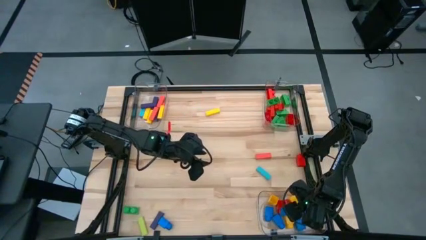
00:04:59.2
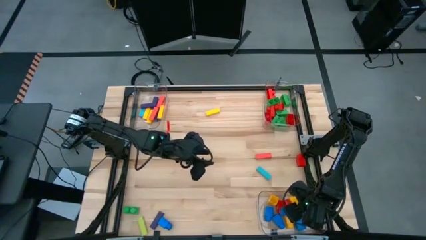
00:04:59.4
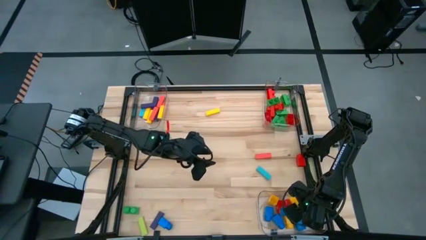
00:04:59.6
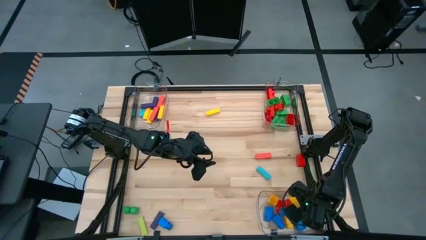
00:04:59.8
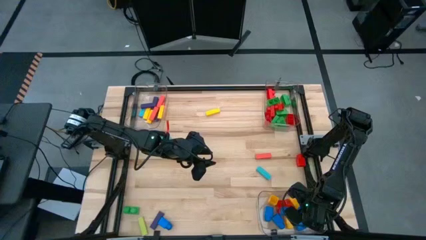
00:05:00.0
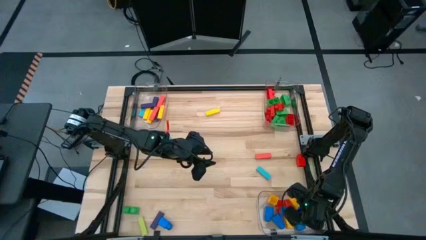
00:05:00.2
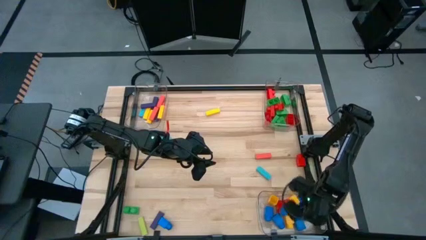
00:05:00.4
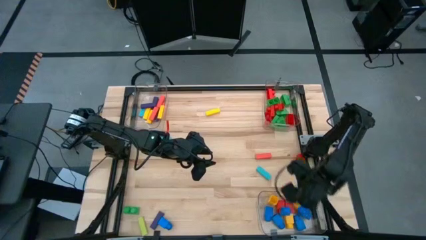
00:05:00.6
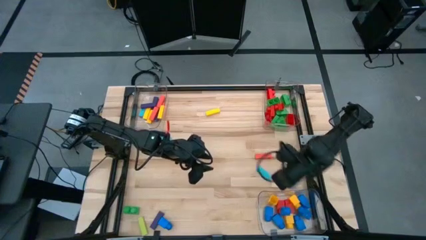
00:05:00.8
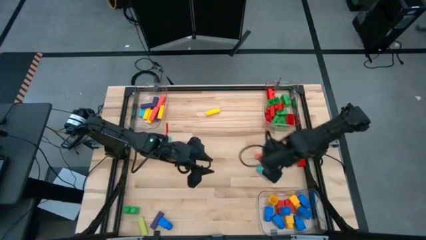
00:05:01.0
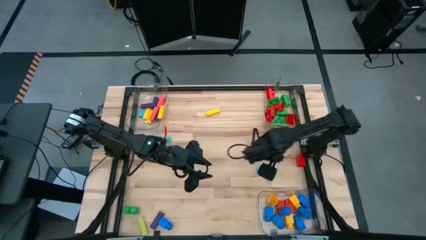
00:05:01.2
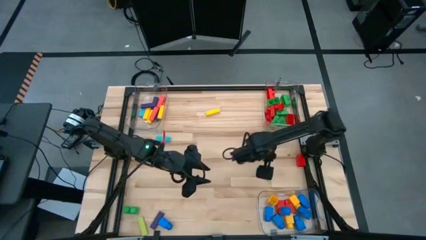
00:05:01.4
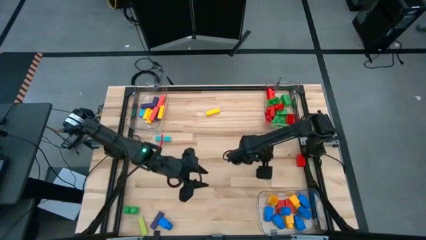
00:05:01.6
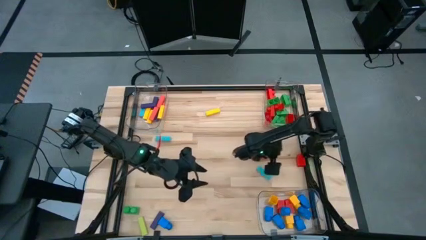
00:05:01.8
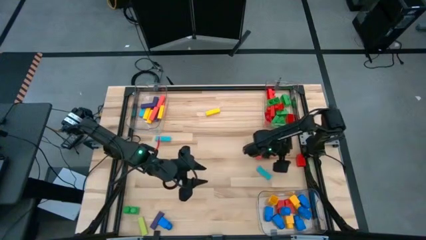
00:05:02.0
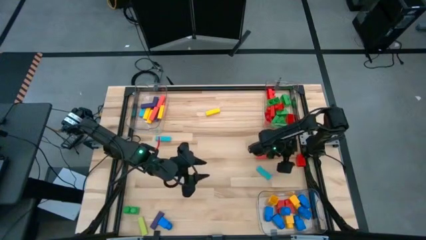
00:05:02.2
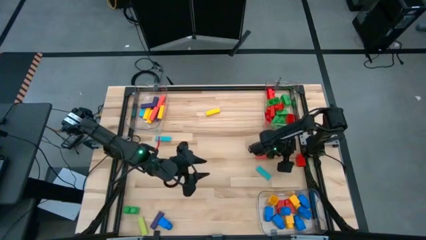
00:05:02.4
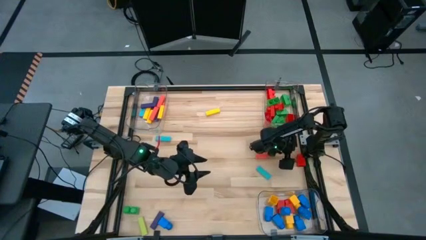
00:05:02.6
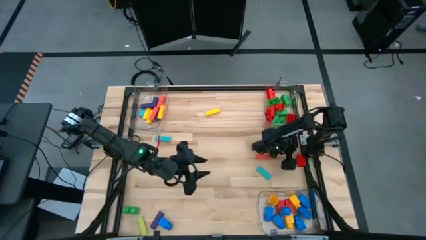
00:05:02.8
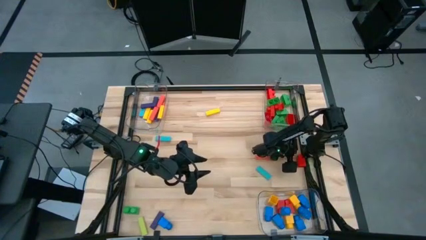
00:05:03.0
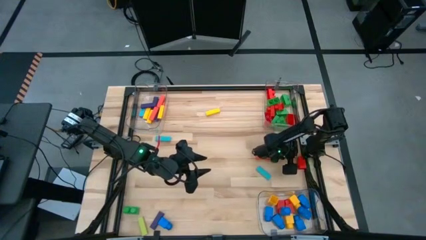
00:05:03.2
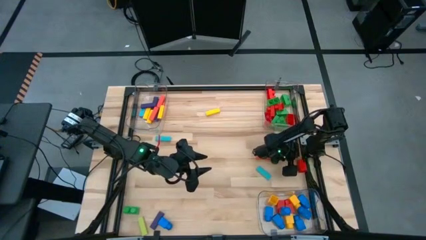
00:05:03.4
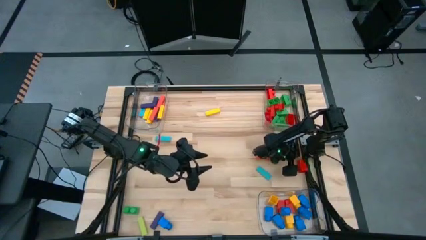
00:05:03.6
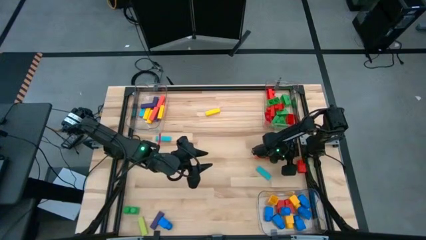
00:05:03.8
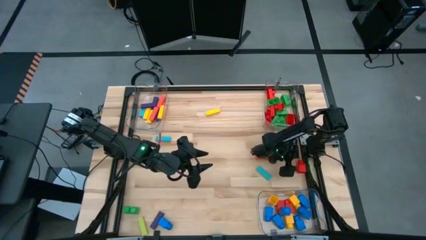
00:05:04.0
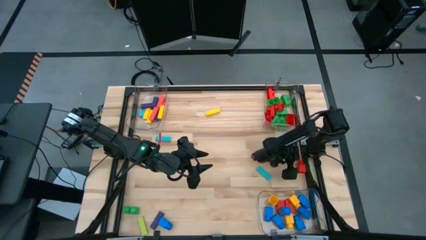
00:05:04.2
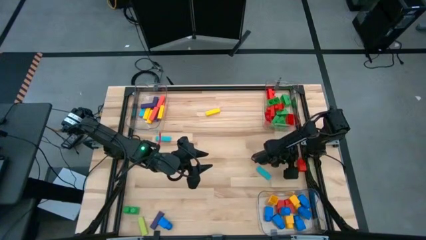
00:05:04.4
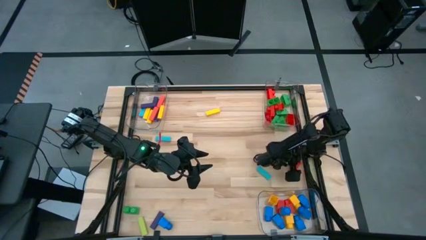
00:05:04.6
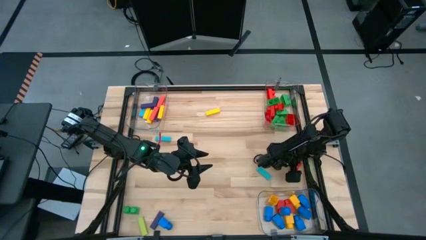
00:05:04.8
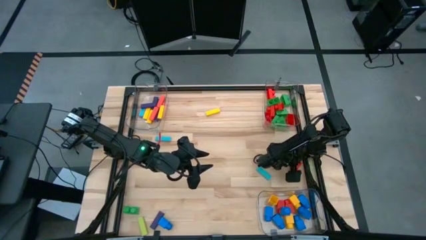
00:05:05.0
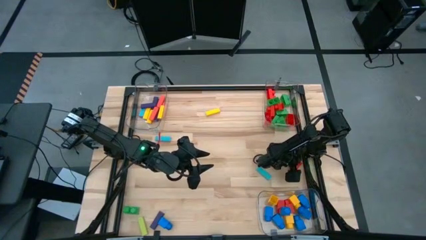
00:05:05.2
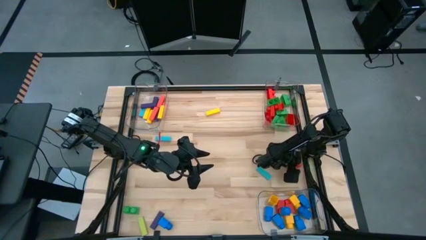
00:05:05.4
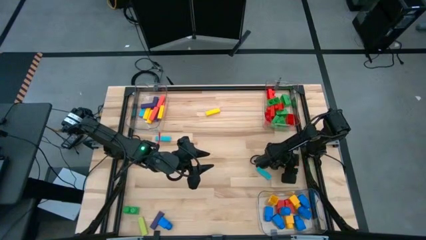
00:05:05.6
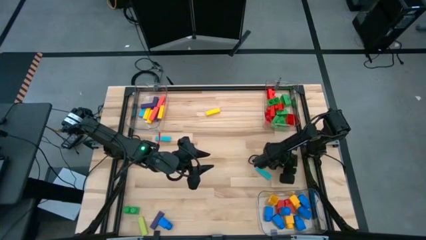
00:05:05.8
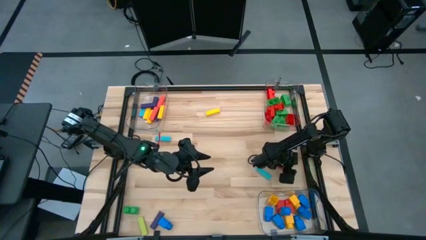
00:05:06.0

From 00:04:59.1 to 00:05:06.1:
Task: Sort blocks by size
Put the red 1 stud game piece into the bottom transparent bin

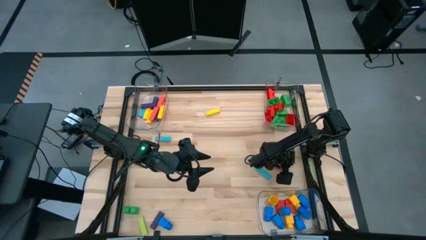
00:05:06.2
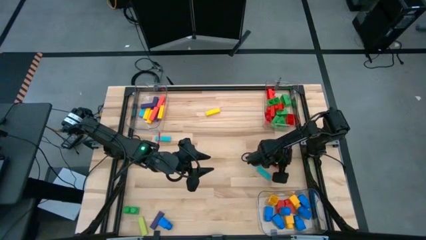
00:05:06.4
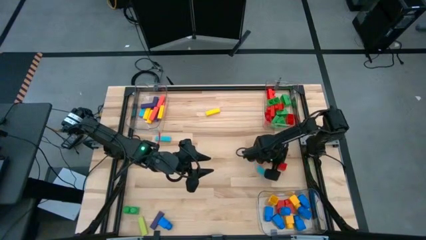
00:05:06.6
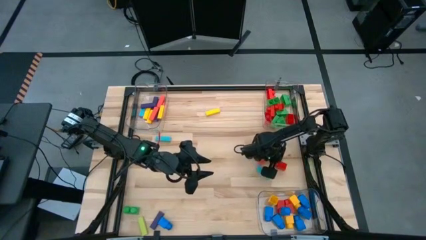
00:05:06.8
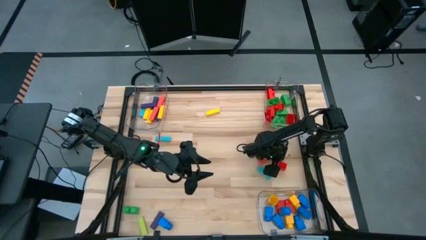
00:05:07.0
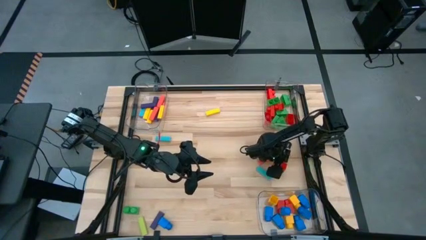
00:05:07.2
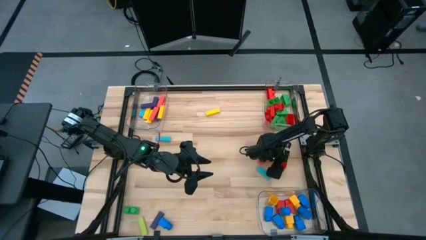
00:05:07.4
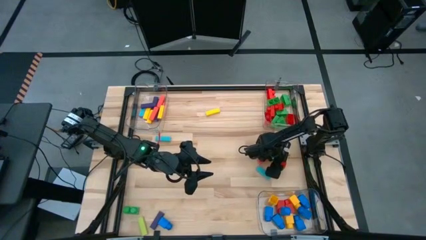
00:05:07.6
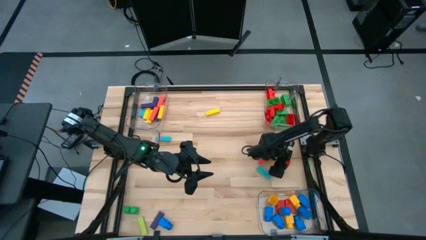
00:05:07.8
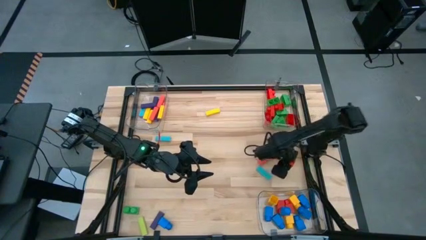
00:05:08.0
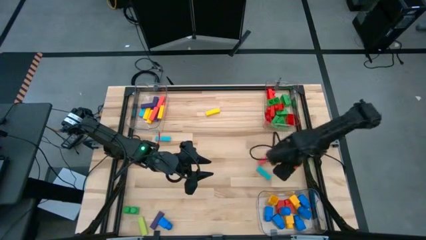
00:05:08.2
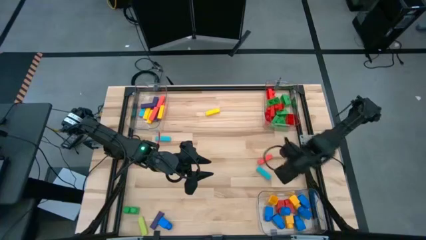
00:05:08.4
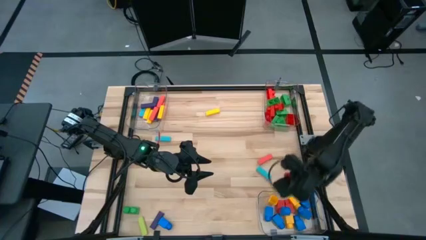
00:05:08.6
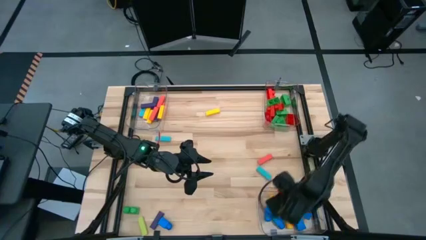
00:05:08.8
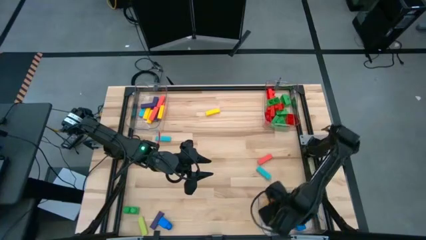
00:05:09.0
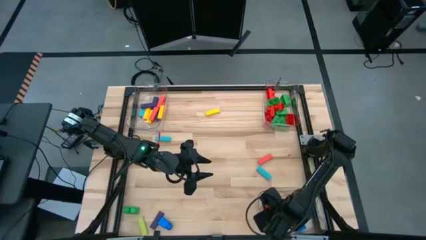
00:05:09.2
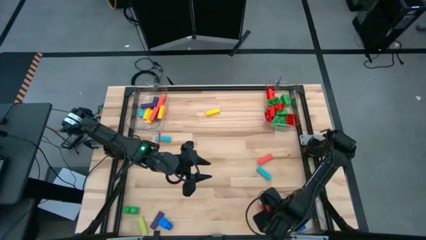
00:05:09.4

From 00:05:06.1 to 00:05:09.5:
Put the red 1 stud game piece into the bottom transparent bin
